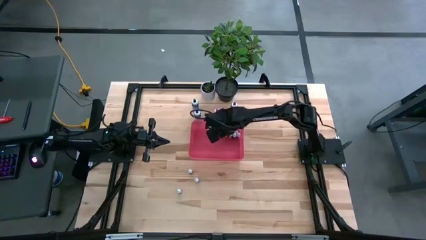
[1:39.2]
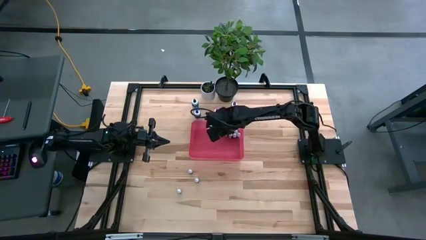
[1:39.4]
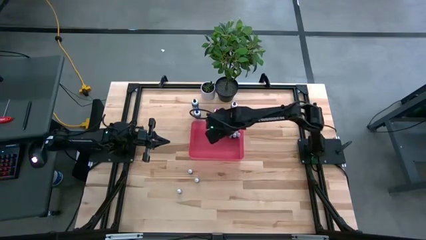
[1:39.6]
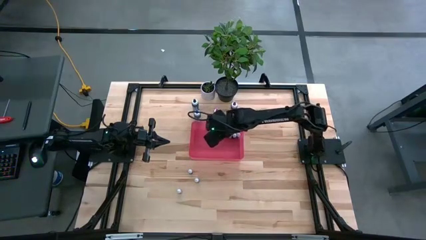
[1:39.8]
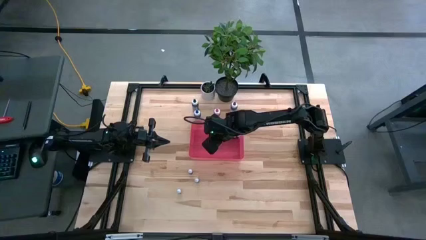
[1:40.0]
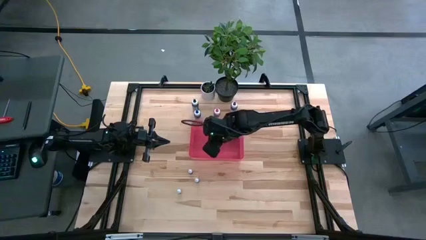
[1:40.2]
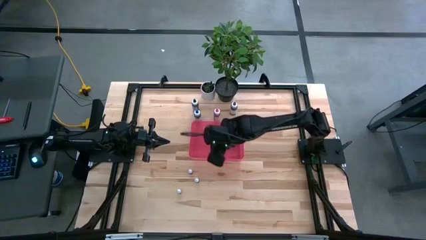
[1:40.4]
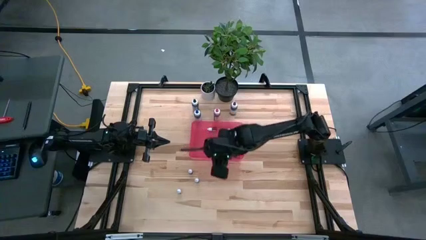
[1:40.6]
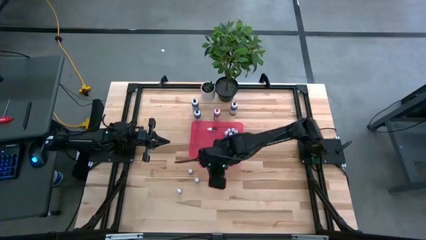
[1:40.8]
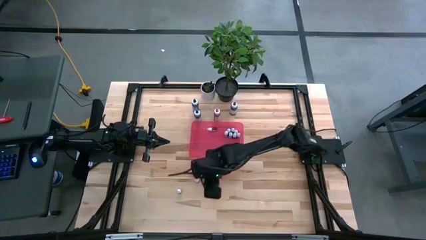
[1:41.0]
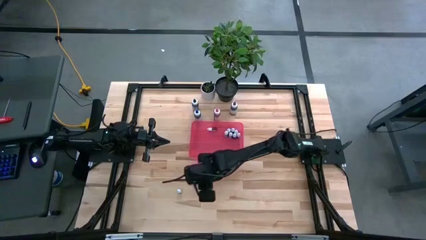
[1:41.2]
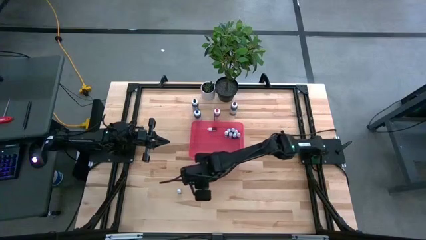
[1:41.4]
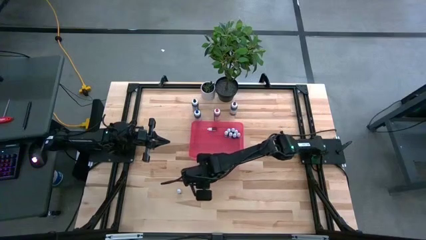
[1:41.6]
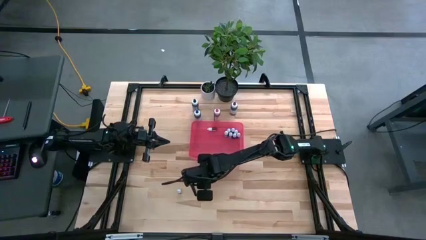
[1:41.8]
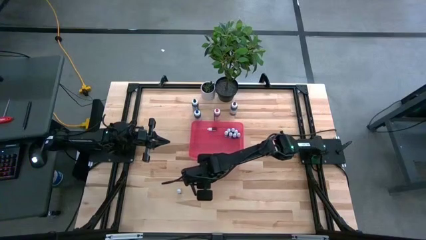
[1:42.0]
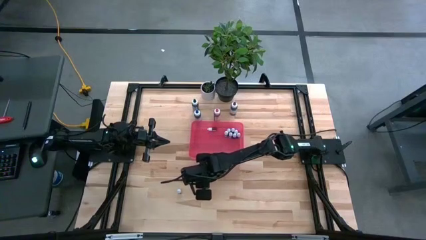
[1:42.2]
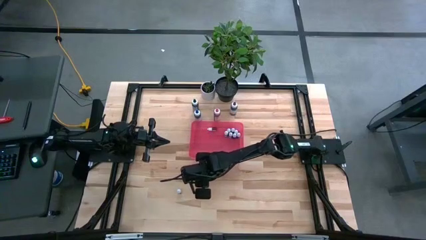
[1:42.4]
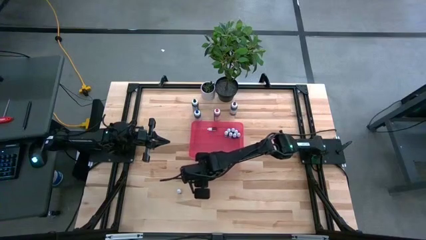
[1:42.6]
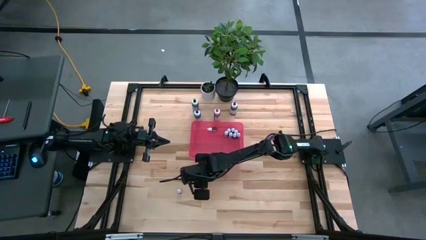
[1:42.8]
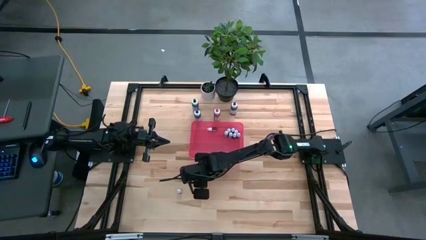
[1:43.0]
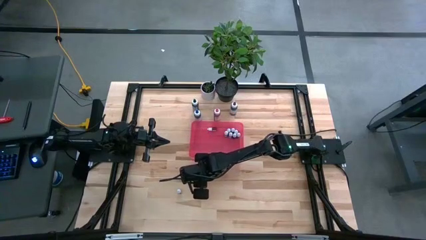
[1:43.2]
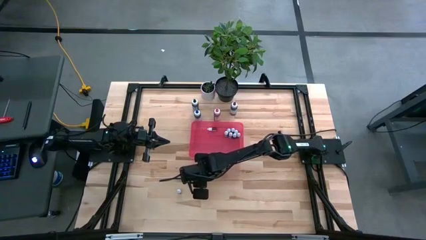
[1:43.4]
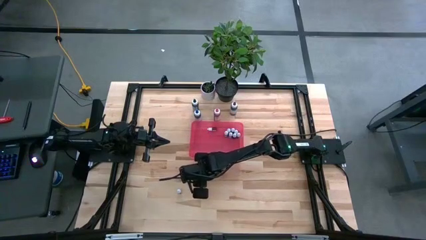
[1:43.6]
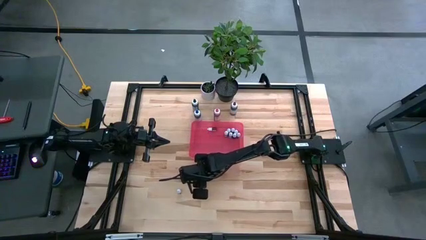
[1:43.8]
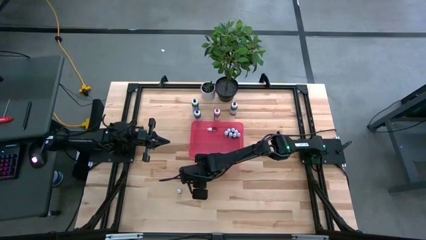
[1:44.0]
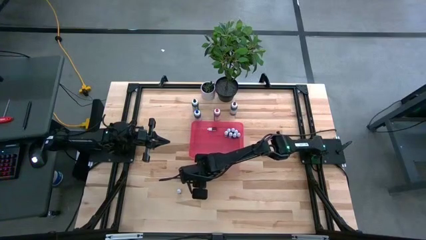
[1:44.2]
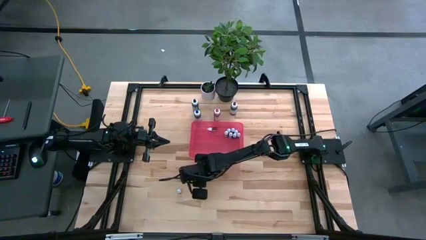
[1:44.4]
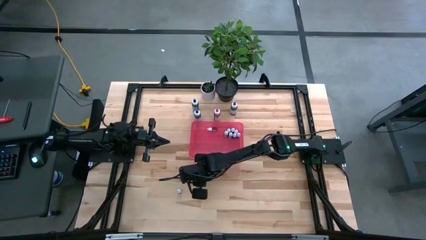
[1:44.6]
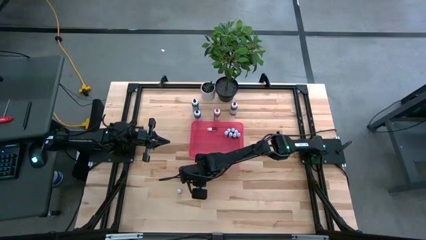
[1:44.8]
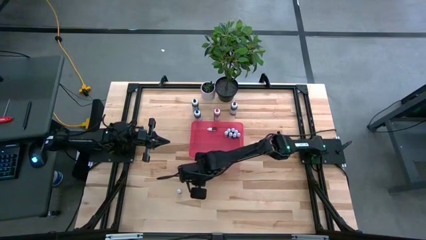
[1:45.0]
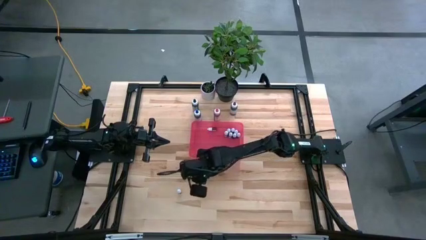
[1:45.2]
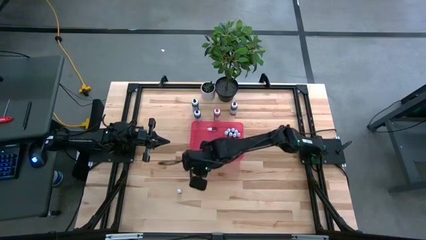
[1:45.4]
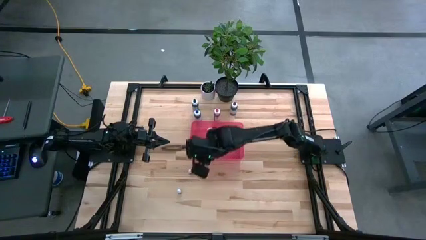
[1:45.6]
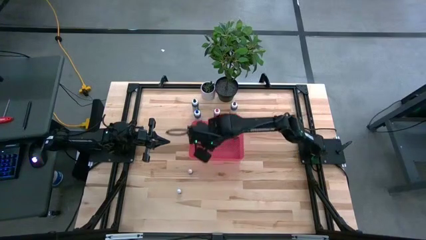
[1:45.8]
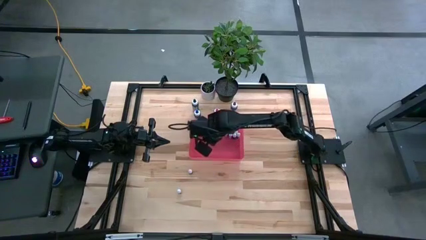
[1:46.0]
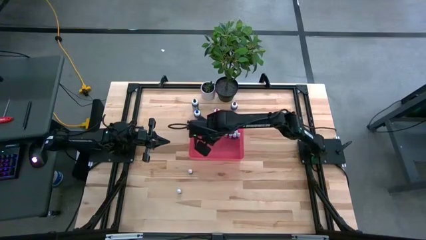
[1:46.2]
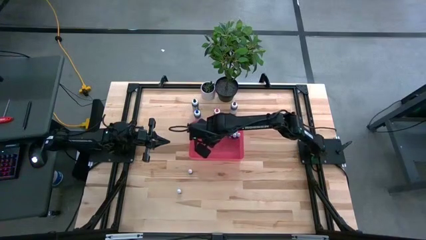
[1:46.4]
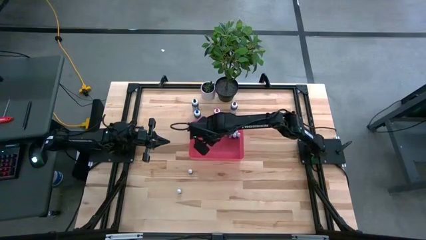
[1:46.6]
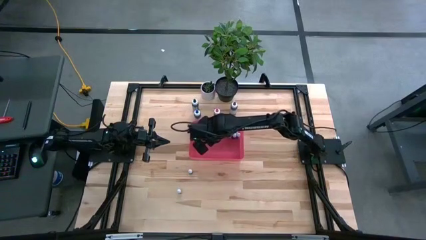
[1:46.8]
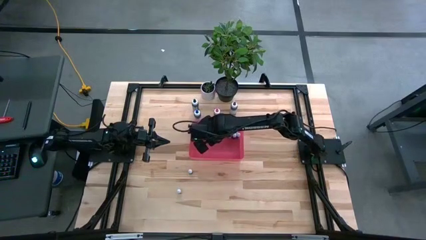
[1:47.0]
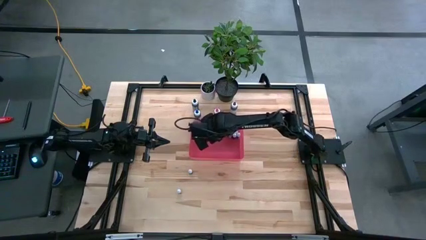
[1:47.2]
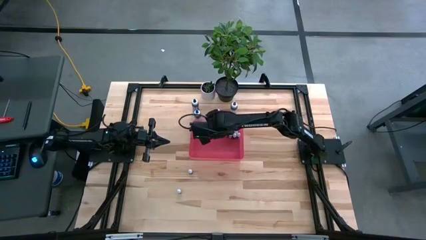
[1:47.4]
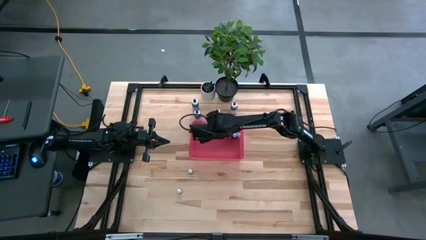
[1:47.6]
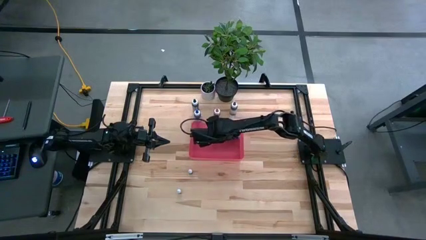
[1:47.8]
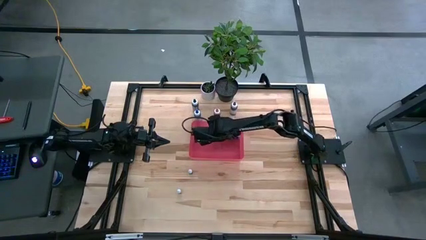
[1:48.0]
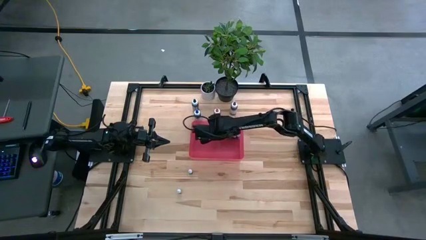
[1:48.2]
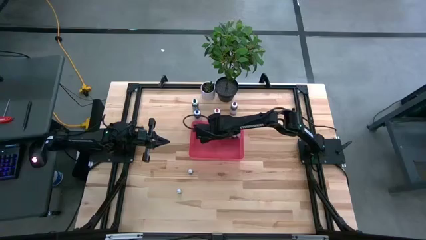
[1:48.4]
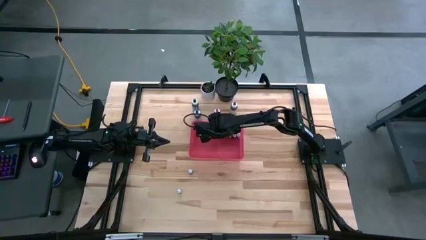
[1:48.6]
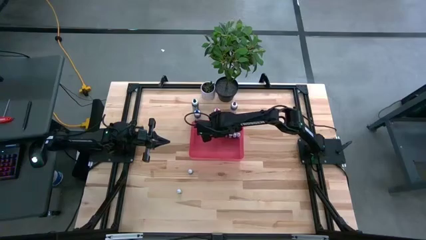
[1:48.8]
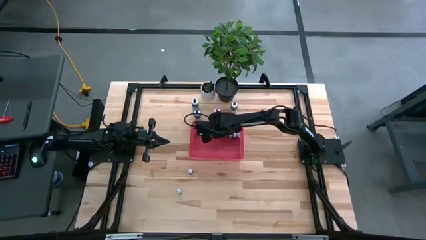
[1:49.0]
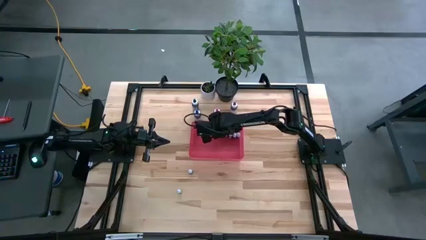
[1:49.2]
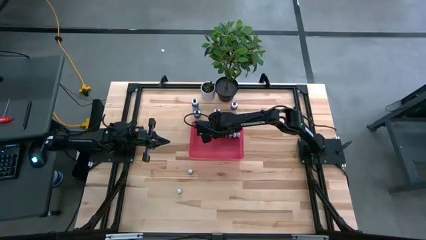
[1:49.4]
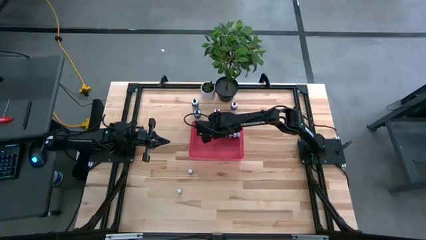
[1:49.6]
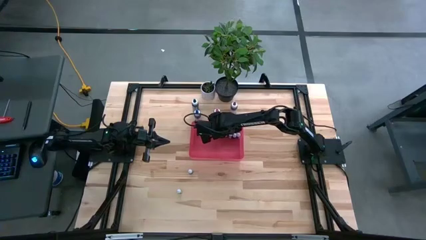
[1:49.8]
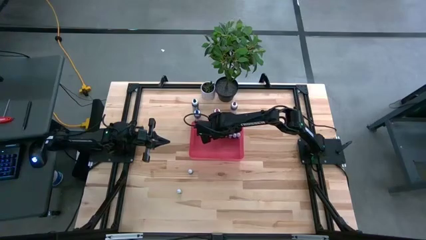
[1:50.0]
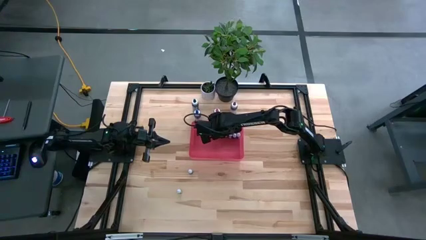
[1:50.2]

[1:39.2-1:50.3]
Task: Pick & Place food coloring
Put the small red food coloring bottle into the pink container
